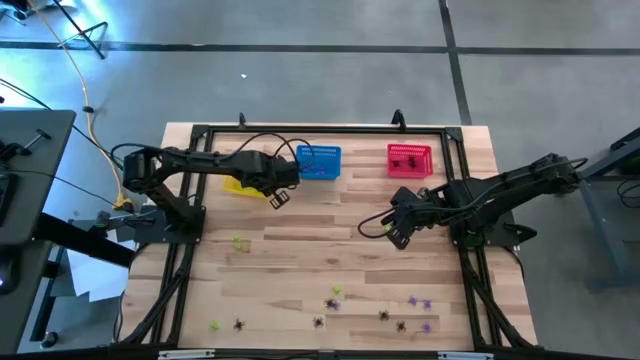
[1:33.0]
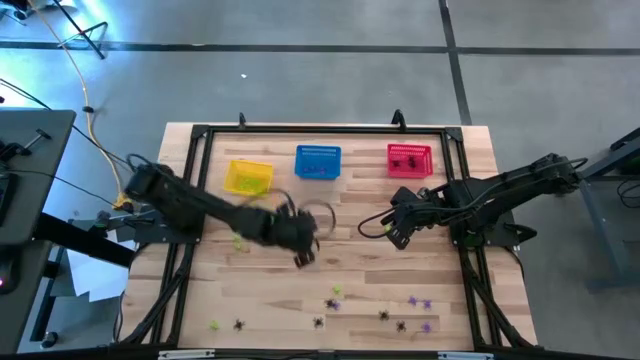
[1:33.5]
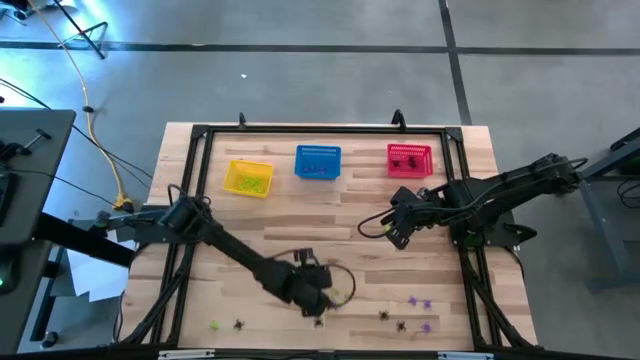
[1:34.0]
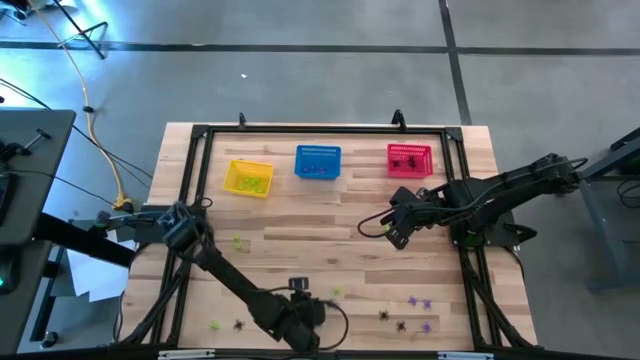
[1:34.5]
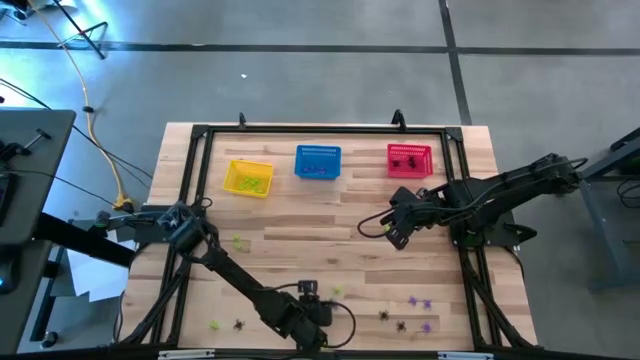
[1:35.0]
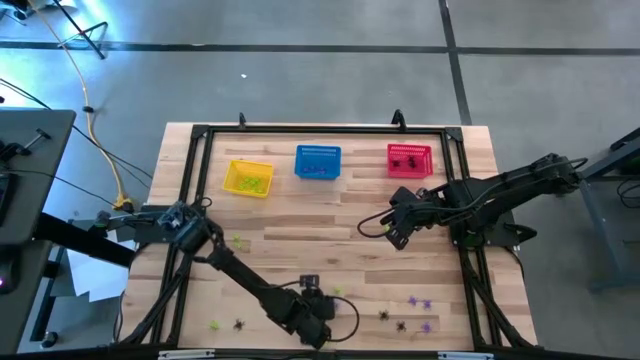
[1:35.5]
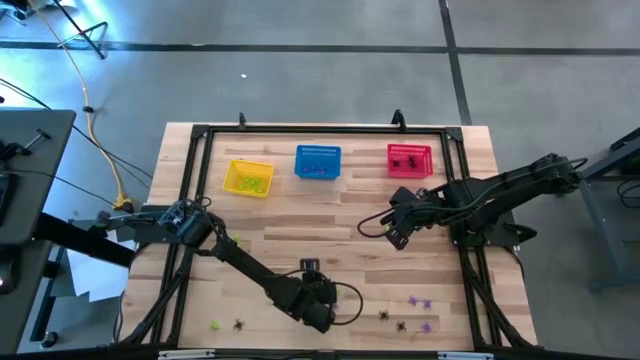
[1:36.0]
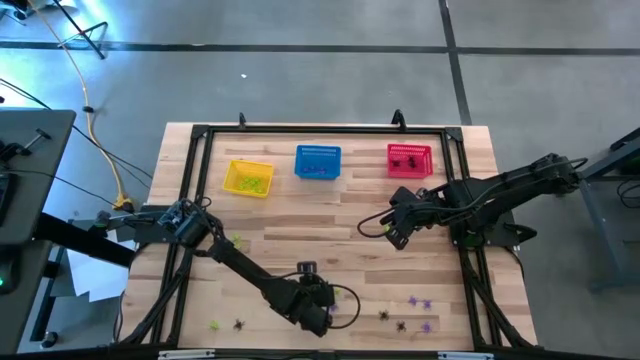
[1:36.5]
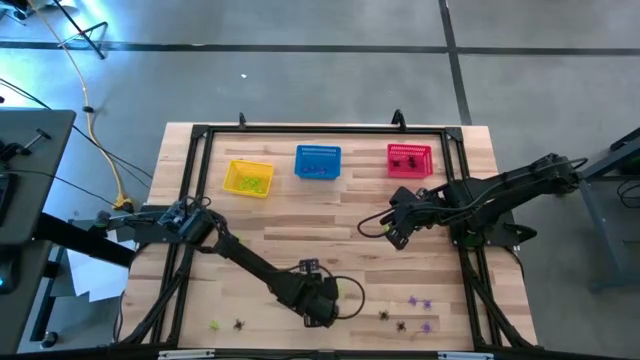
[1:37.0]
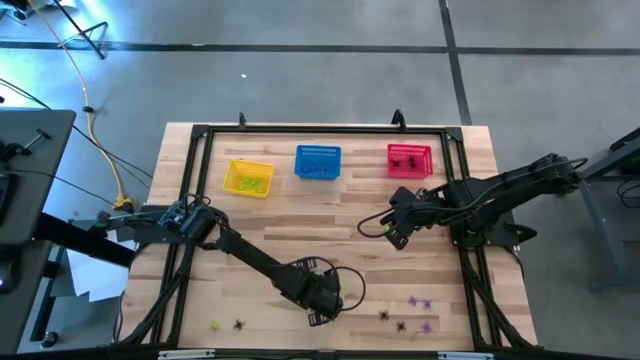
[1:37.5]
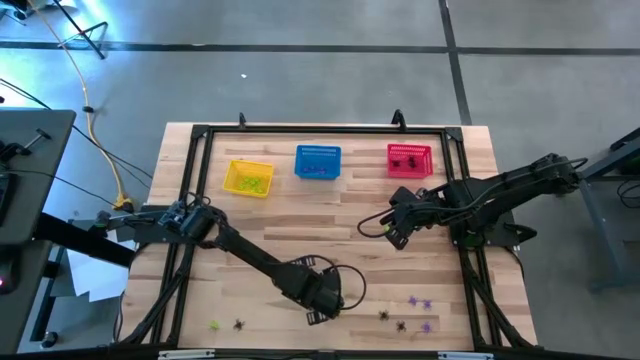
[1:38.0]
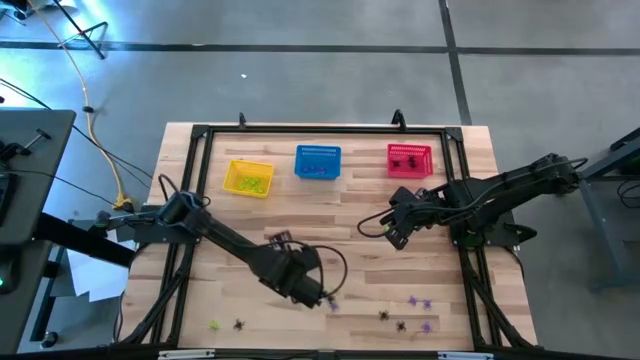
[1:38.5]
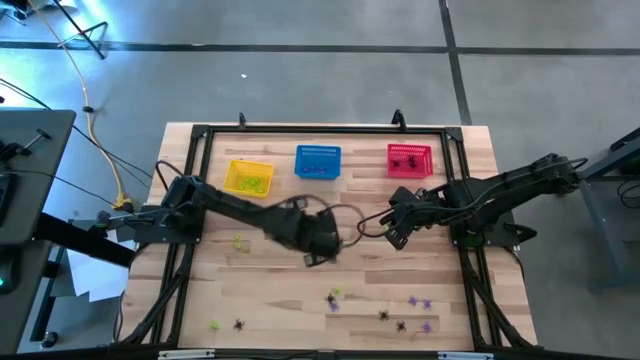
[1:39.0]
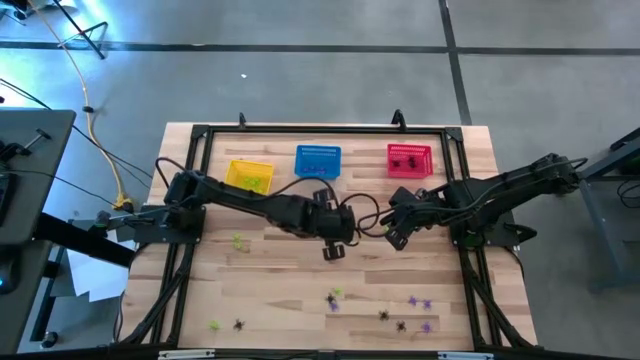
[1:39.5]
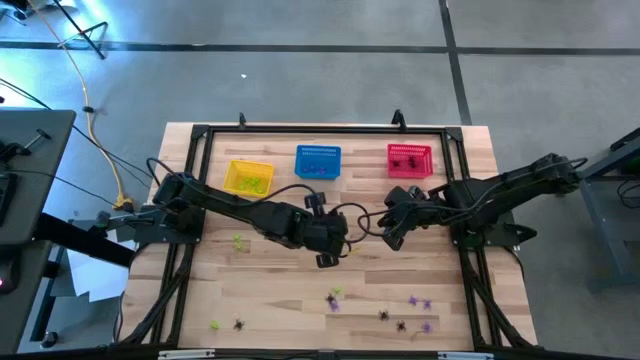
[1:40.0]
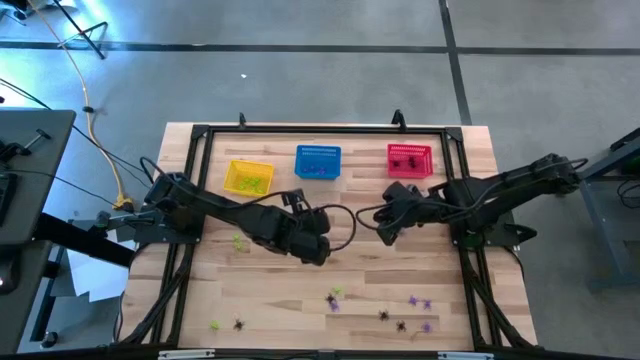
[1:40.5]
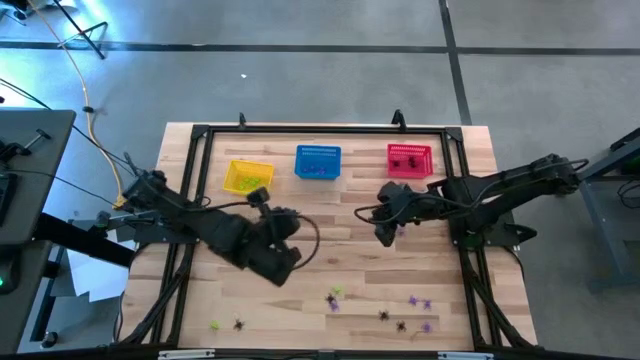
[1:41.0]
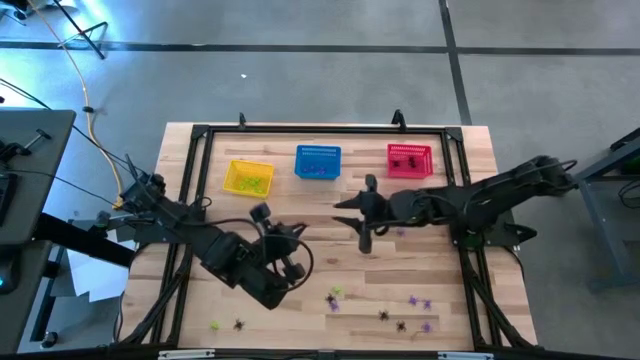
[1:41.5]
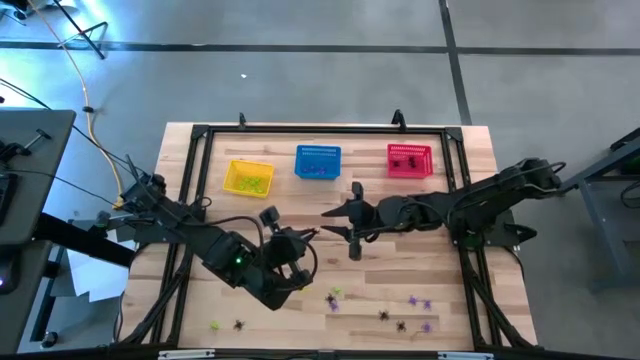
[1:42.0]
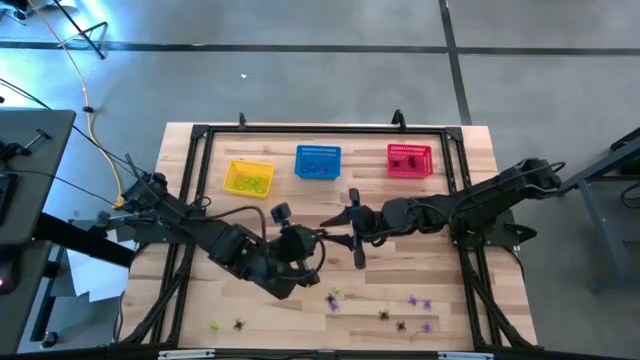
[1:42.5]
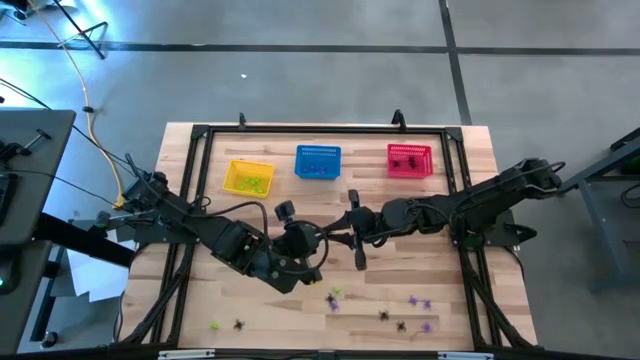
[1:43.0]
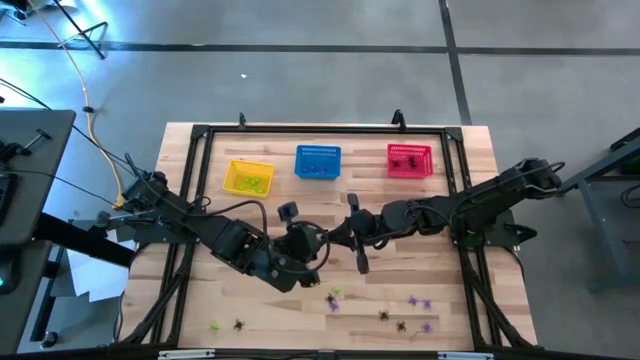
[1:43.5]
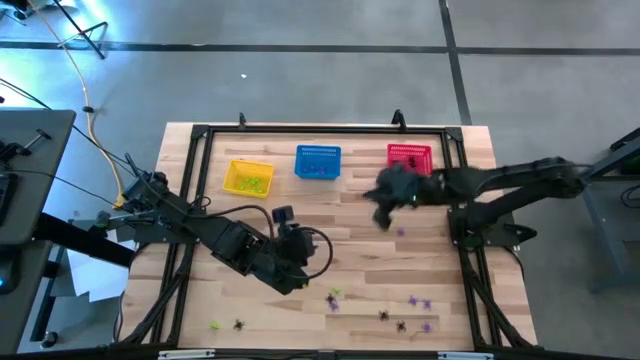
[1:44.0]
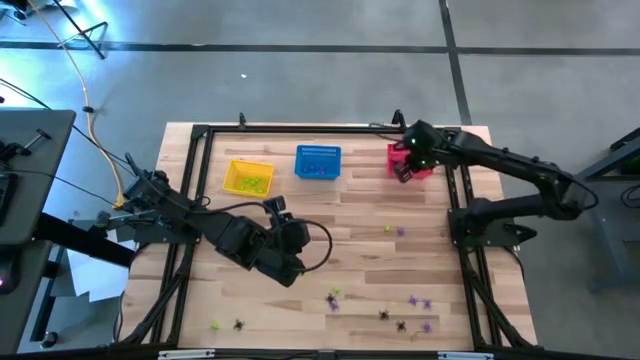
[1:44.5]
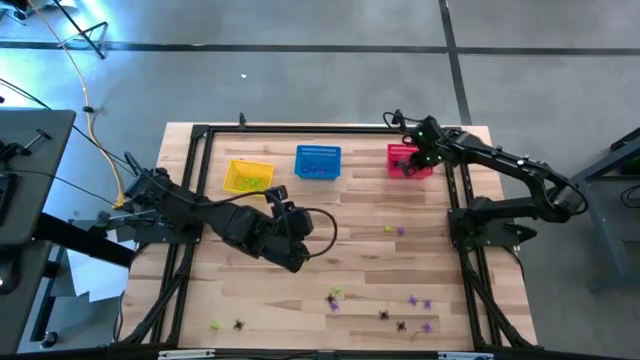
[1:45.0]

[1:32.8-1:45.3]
Task: Sort Halloween decoration
Put the black spider toy into the red bin

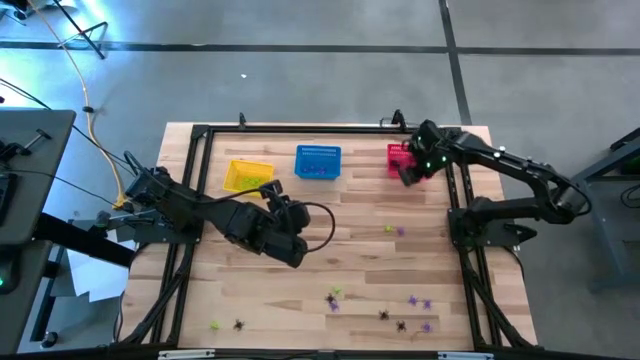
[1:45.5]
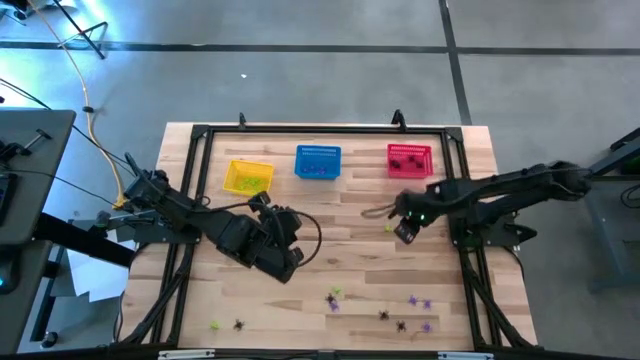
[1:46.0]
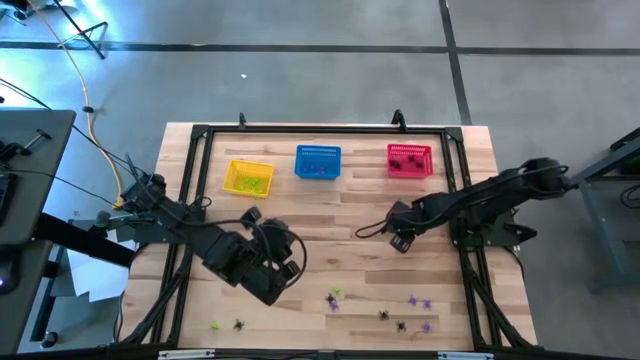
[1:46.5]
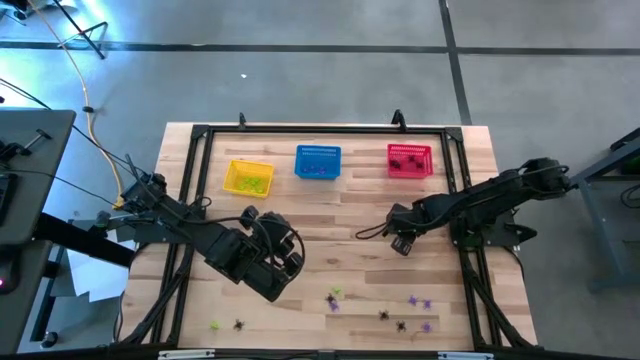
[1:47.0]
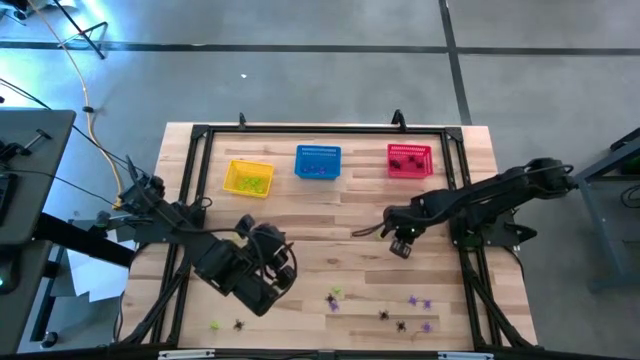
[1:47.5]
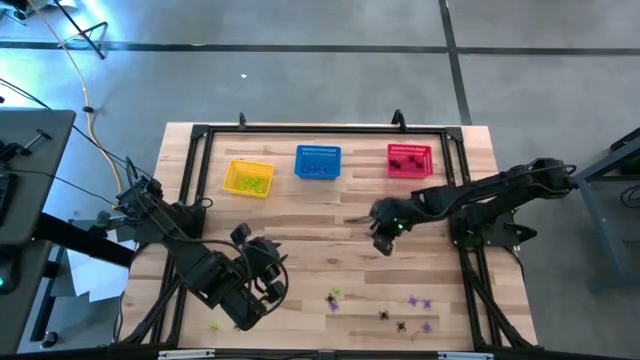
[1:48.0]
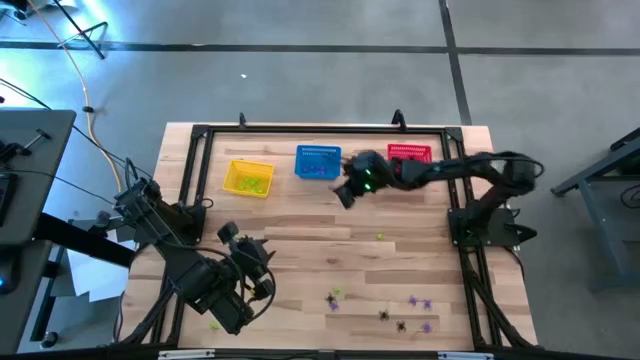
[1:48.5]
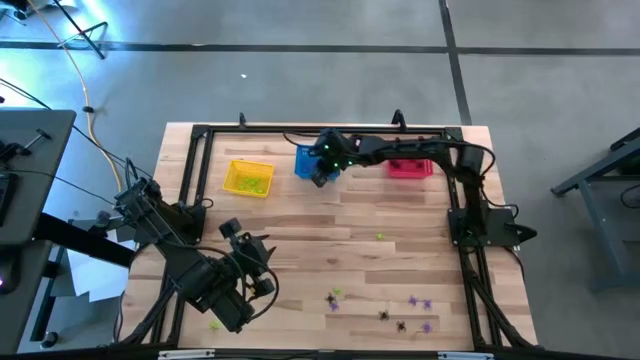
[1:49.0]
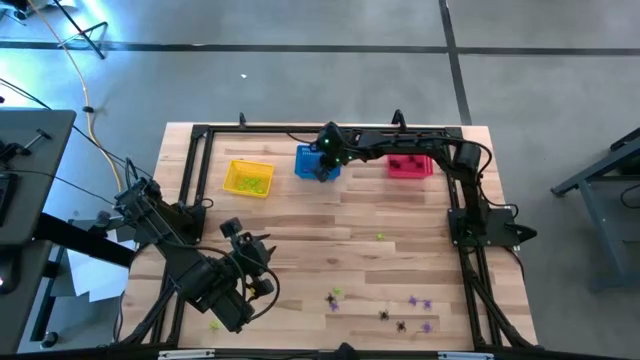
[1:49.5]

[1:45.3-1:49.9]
Put the purple spider toy into the blue bin

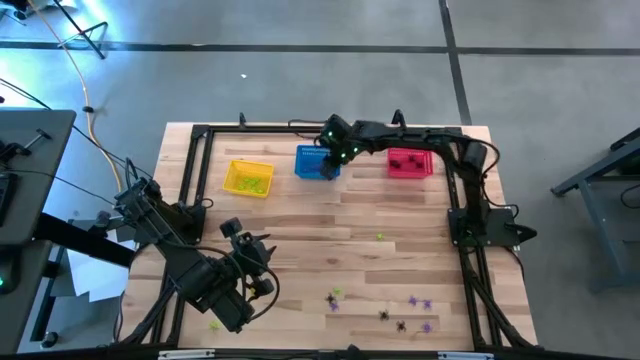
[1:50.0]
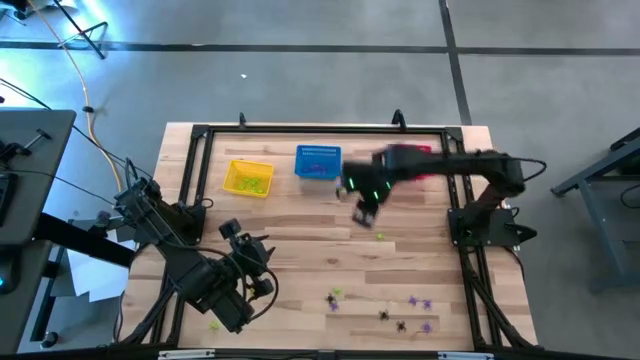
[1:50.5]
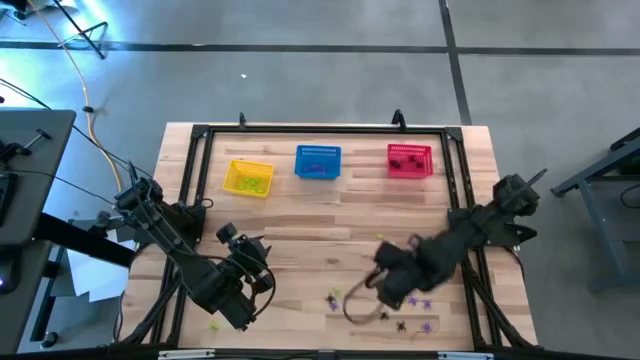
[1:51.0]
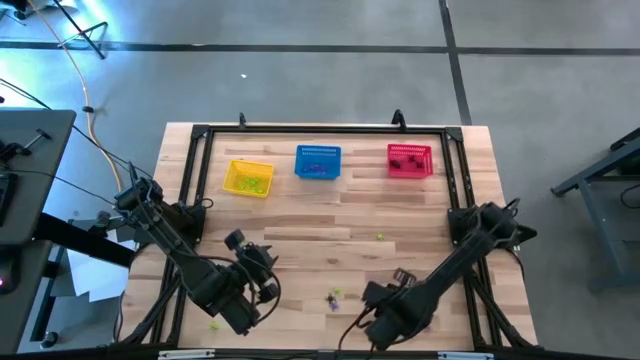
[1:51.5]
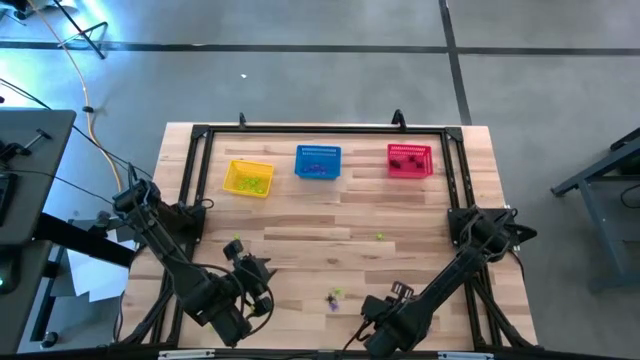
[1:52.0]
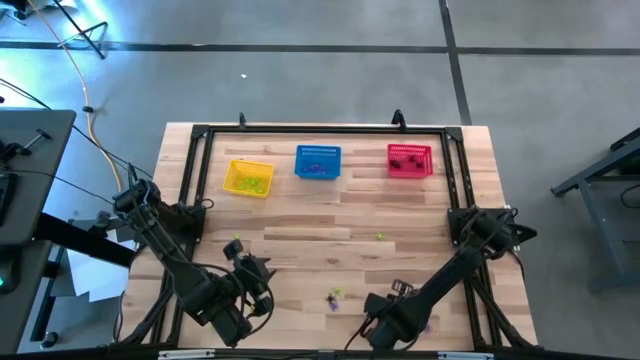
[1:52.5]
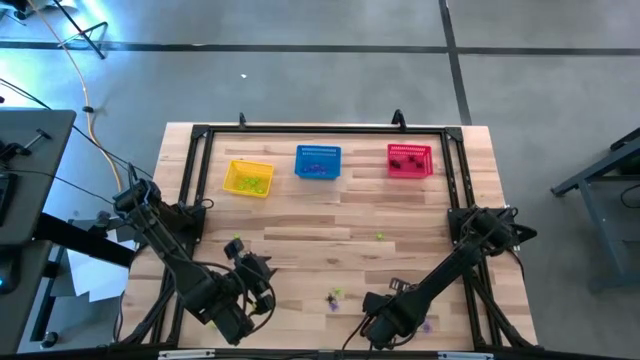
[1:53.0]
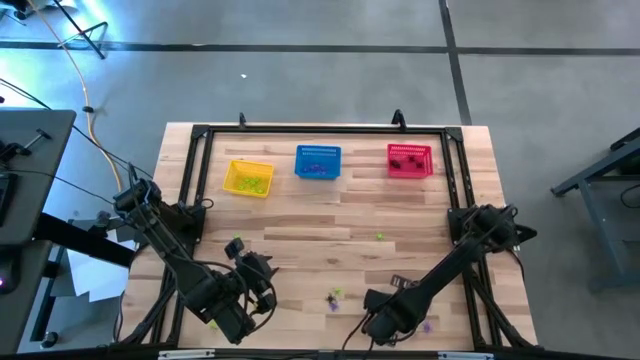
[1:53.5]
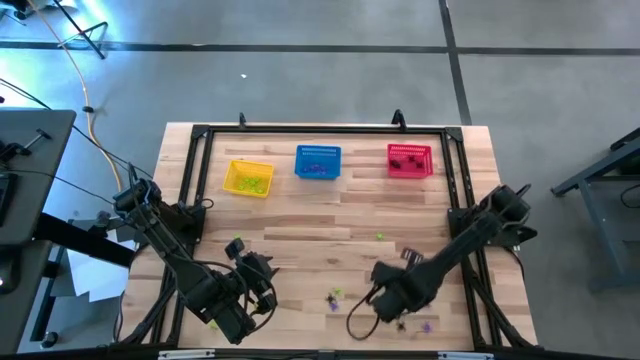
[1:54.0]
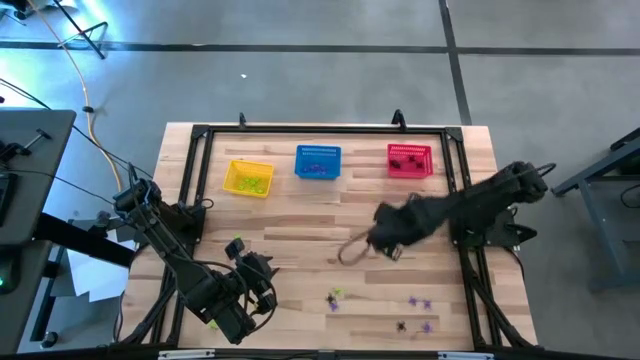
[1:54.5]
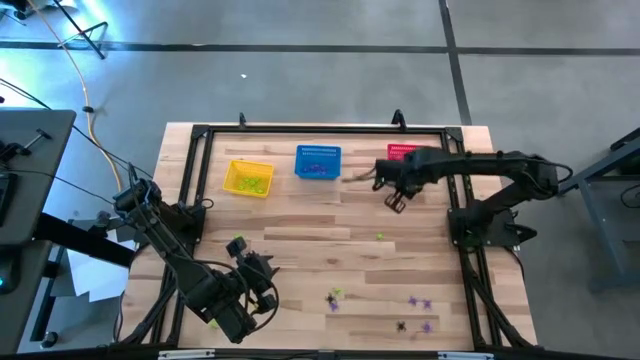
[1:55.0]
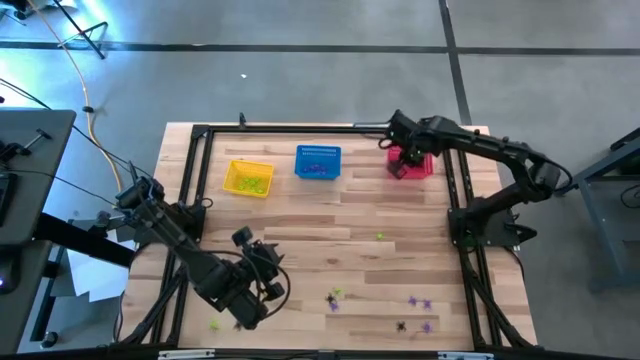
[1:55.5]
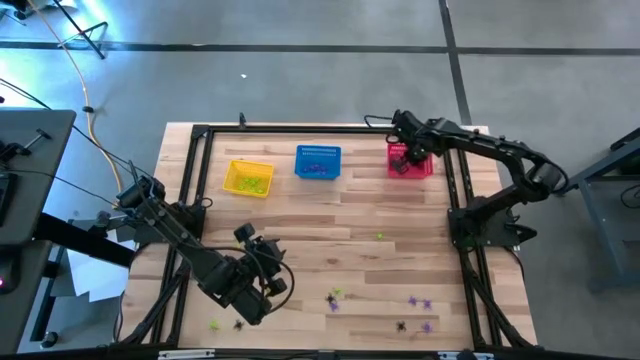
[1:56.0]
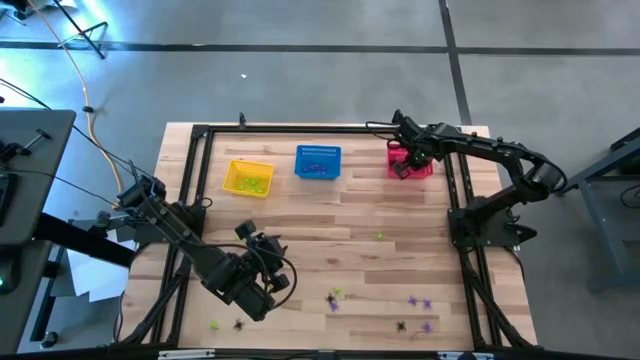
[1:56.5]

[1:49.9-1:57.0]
Put the black spider toy into the red bin
